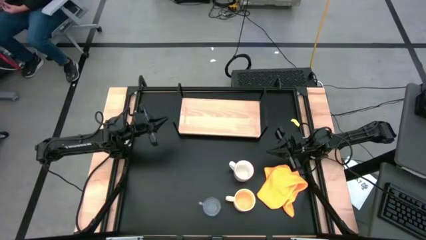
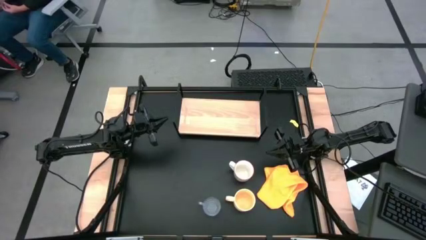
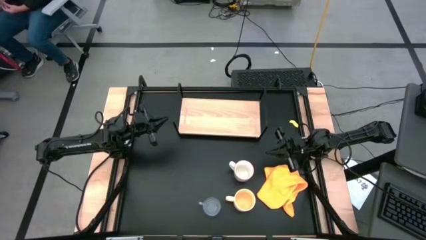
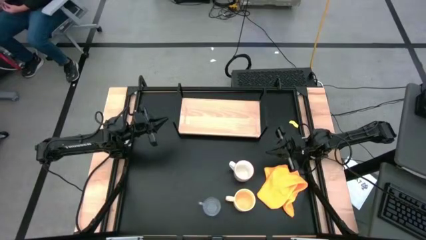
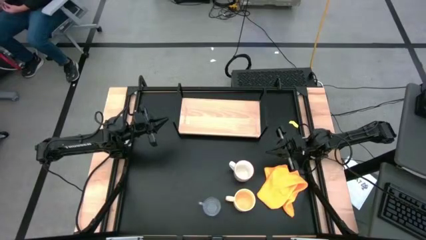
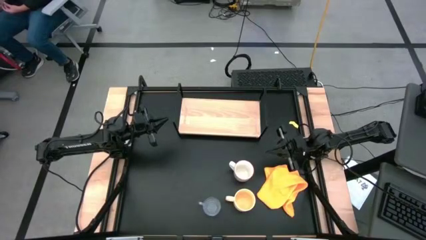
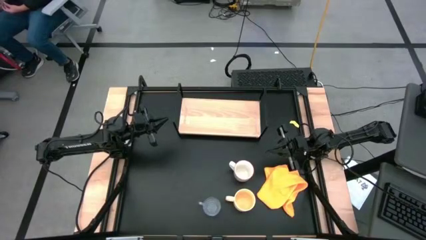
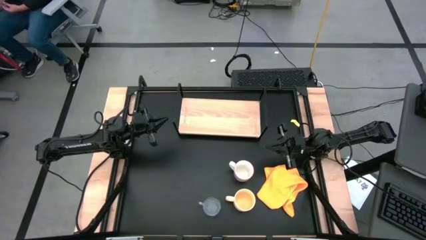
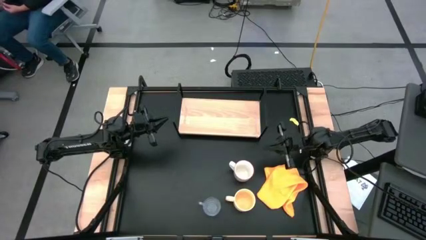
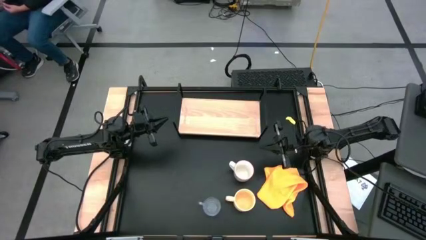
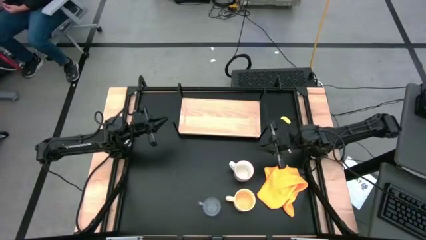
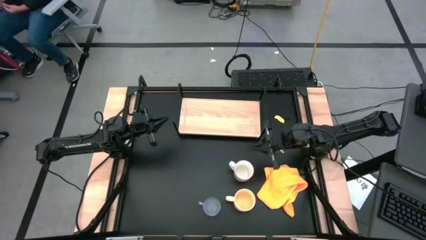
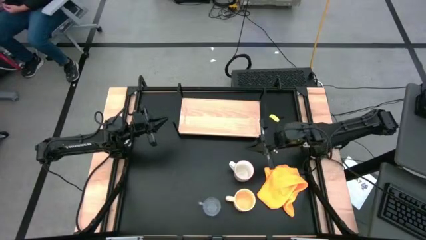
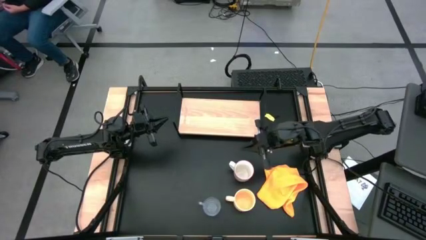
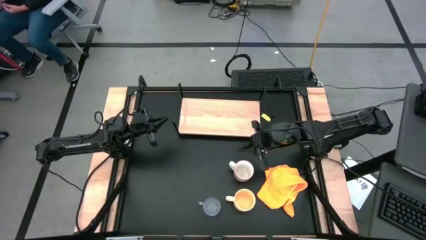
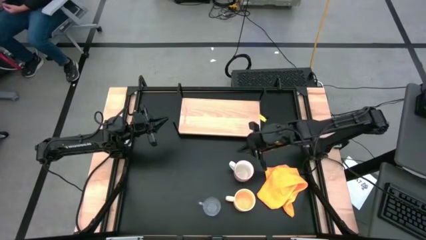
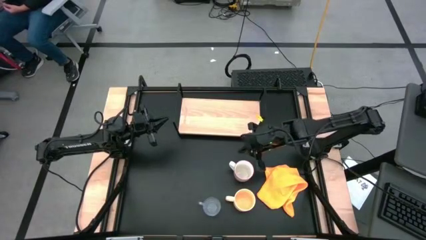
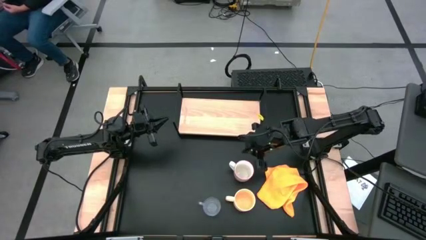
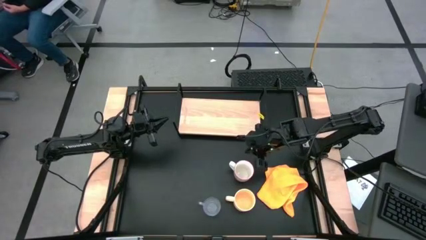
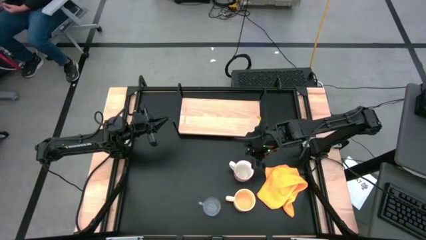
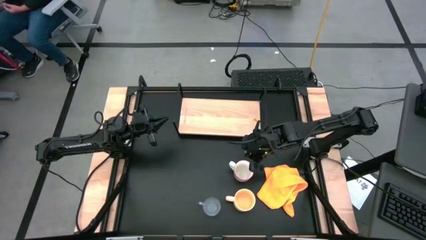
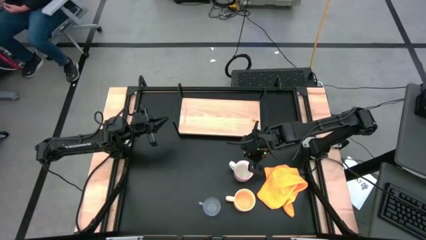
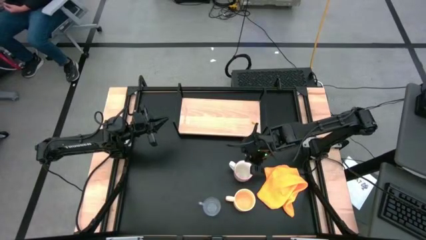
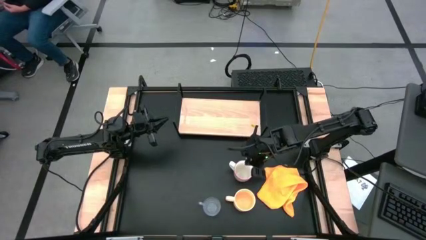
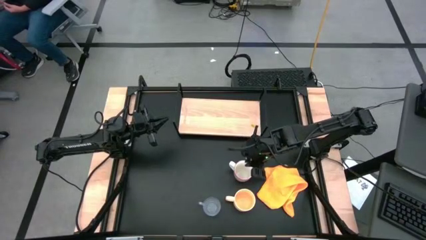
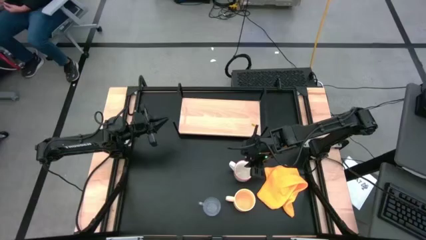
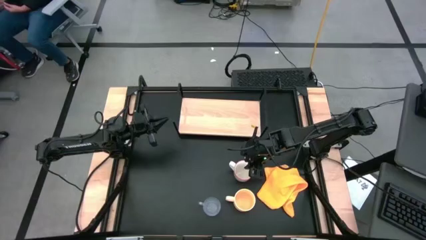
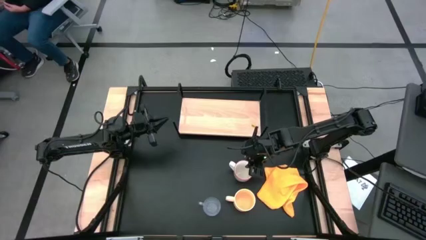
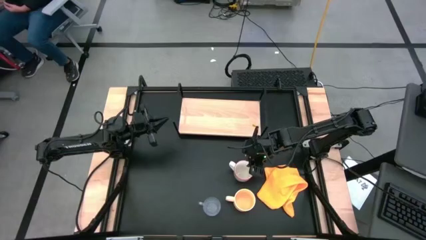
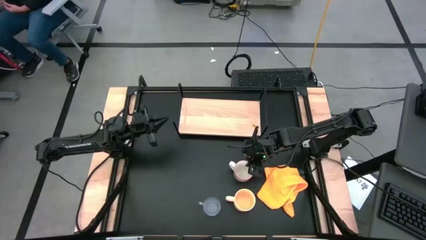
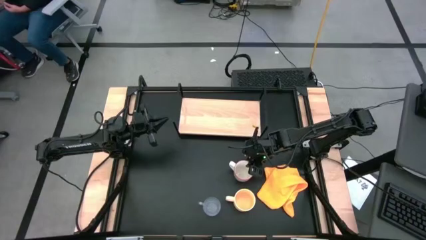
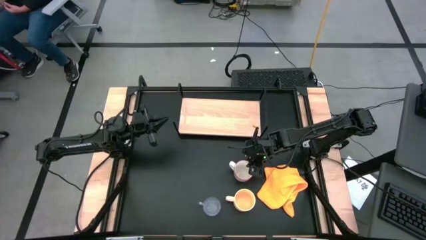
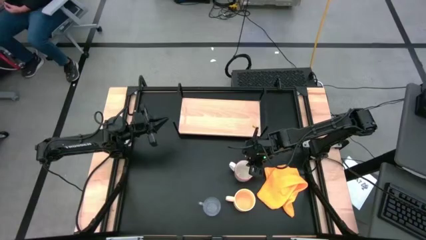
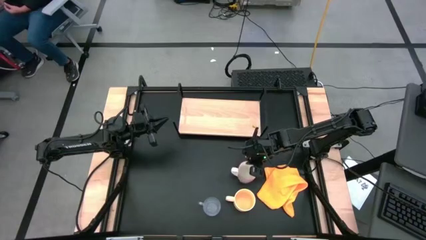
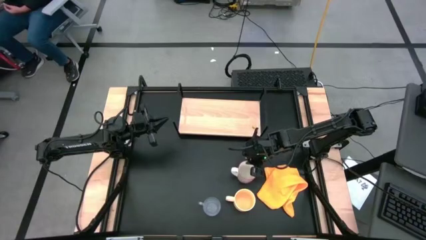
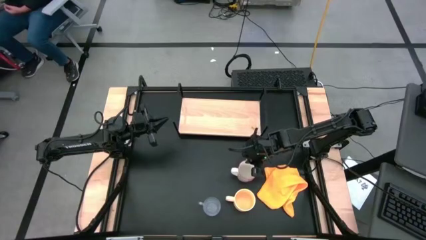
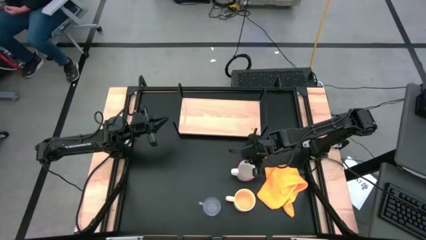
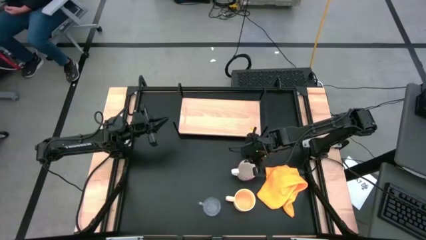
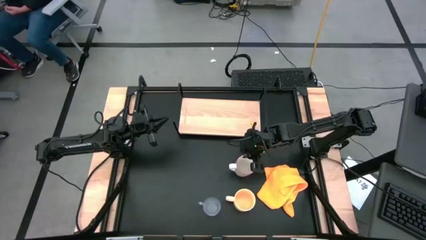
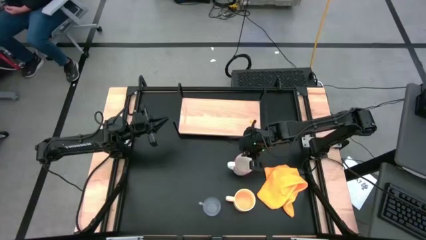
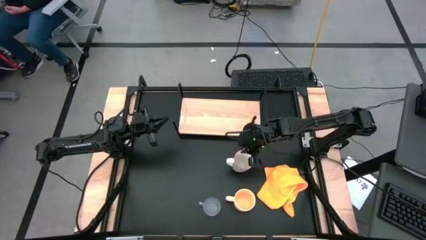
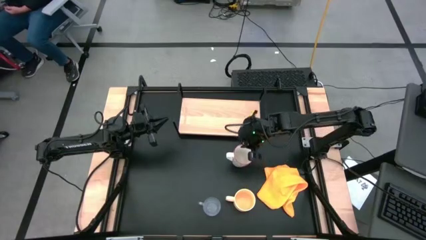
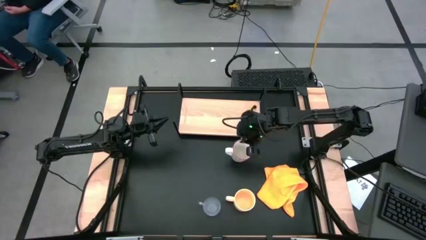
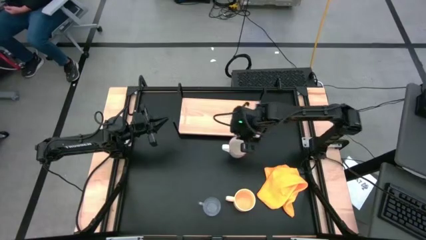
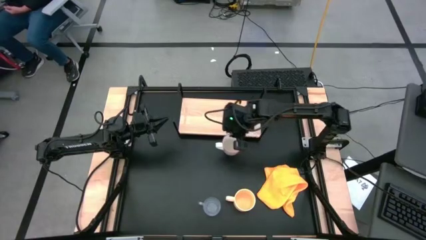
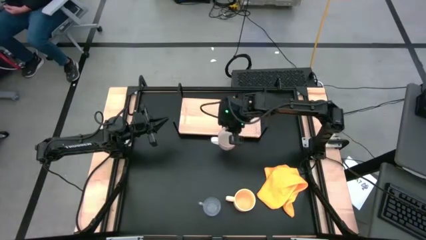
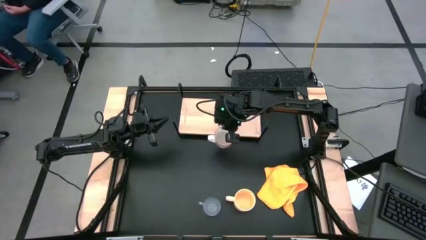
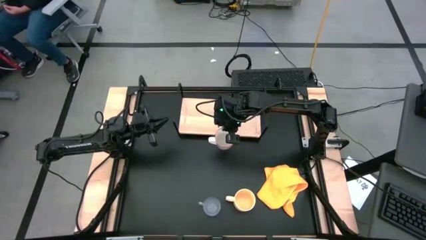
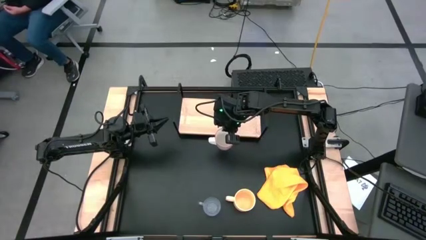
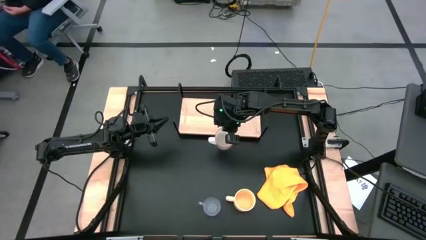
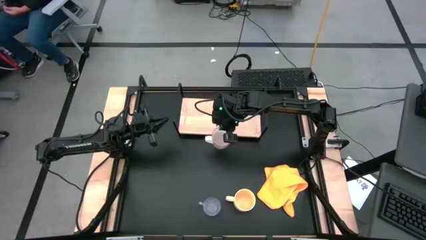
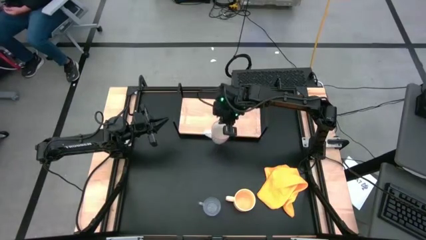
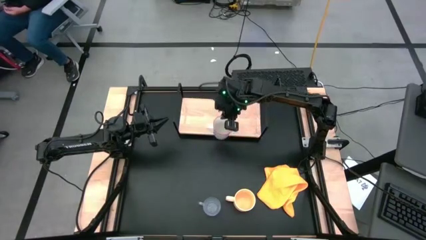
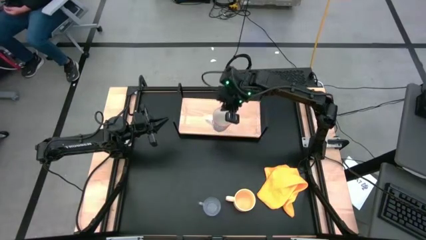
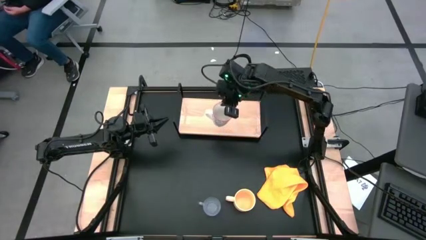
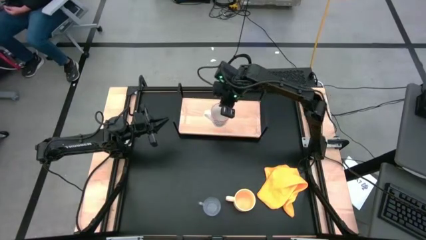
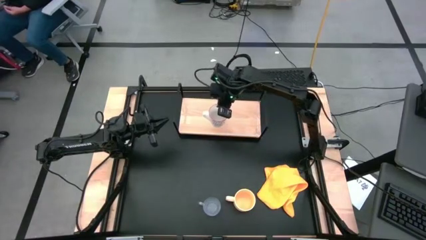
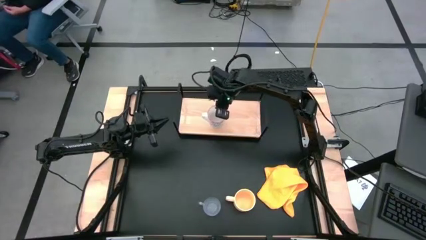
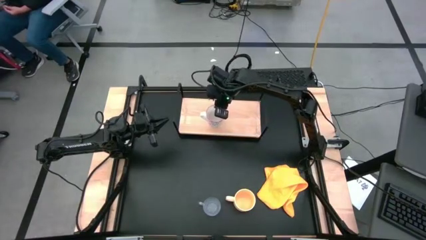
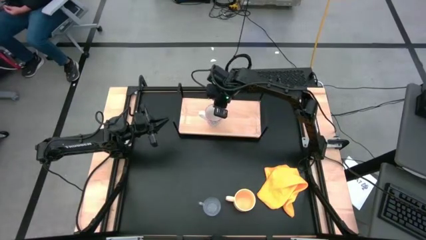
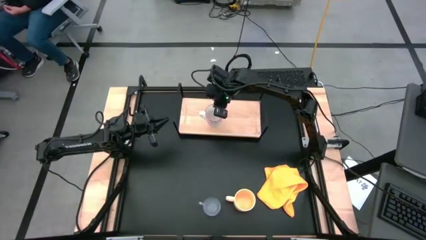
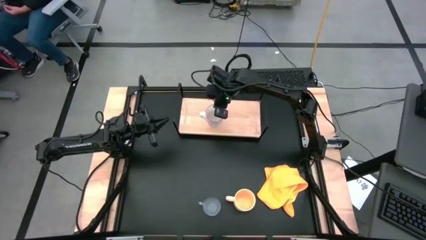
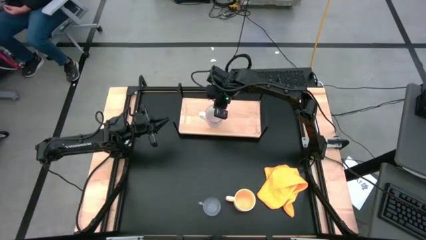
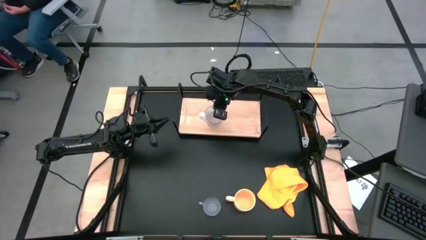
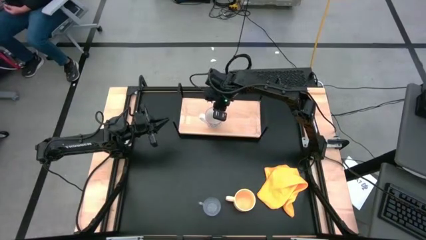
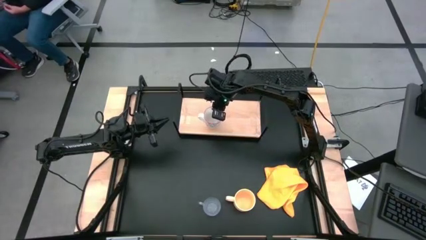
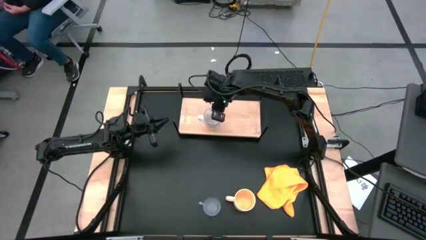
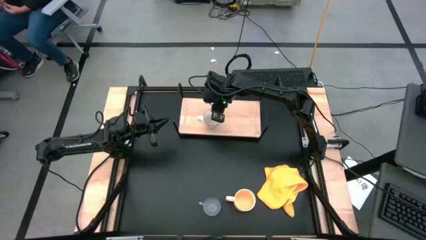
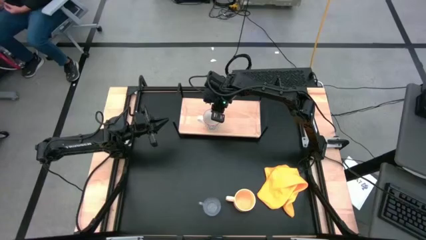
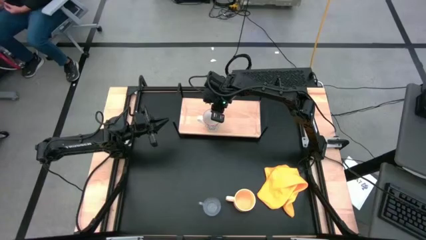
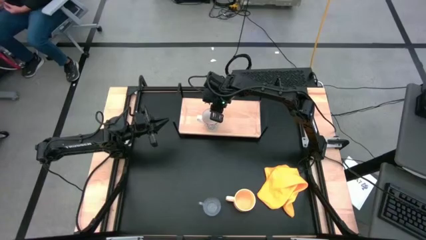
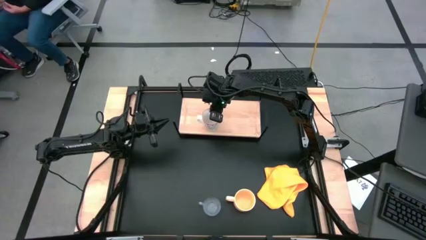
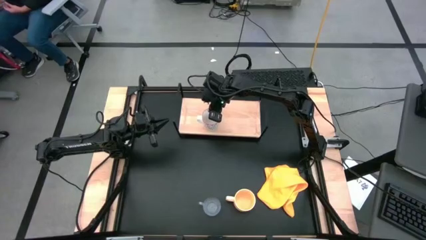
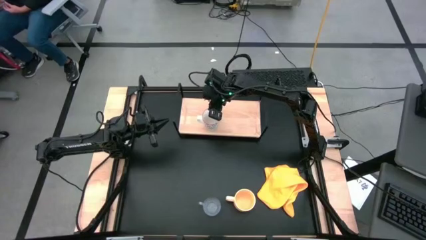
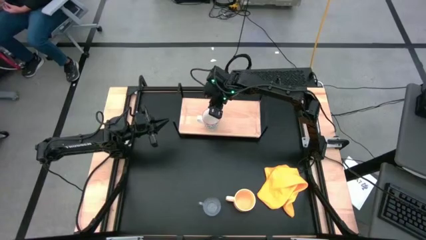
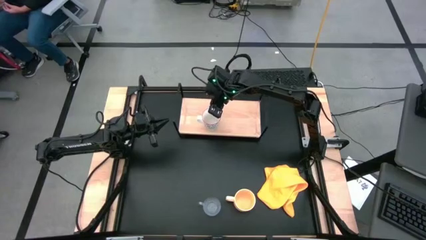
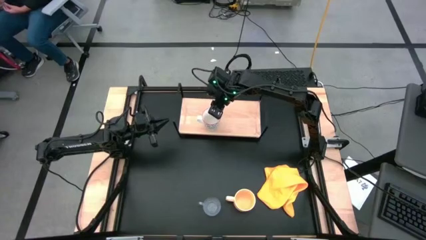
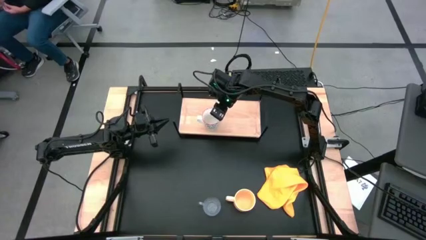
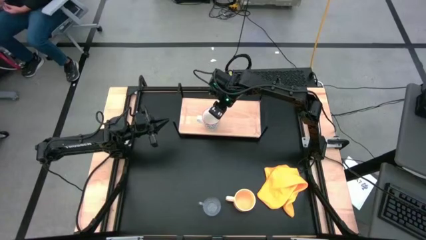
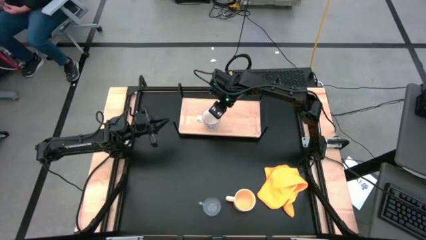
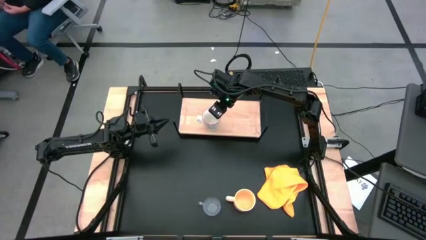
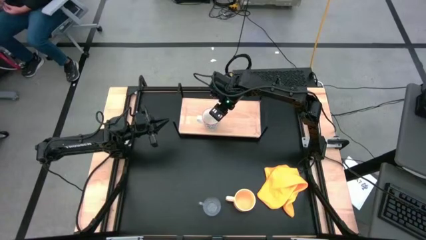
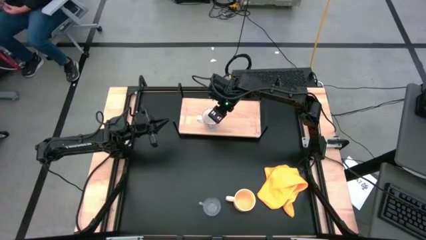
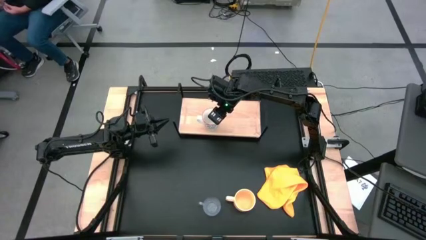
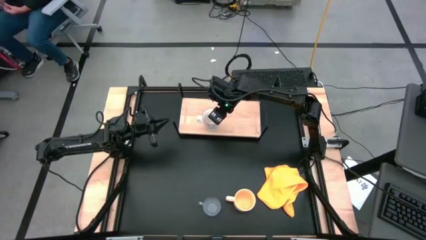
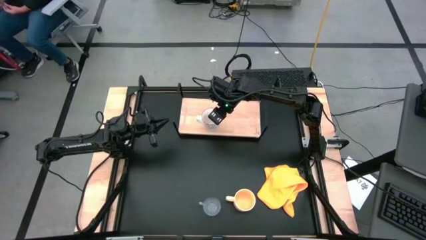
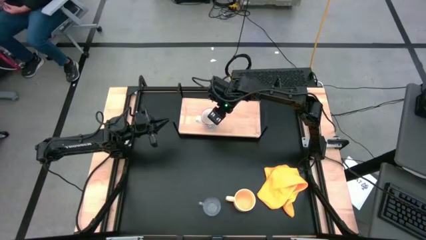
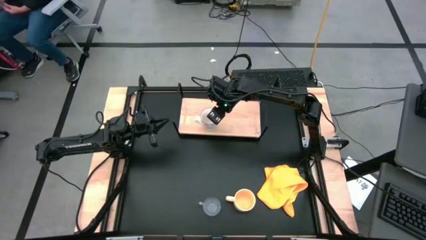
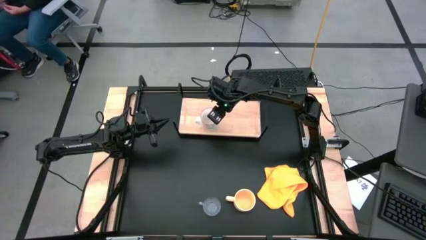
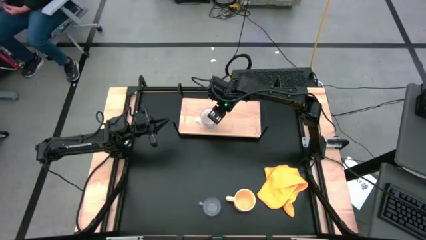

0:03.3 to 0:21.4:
Task: Stack small to large cups/mugs on shelf
Put the gray patterned mug on the shelf
